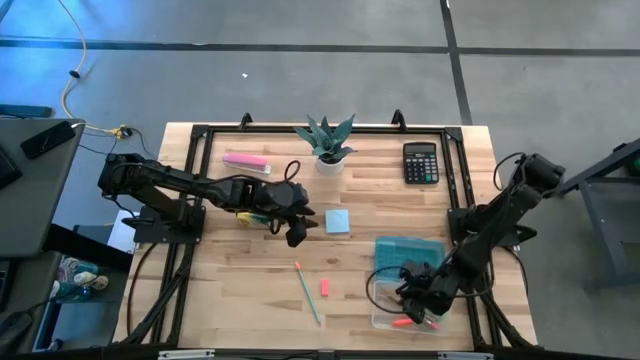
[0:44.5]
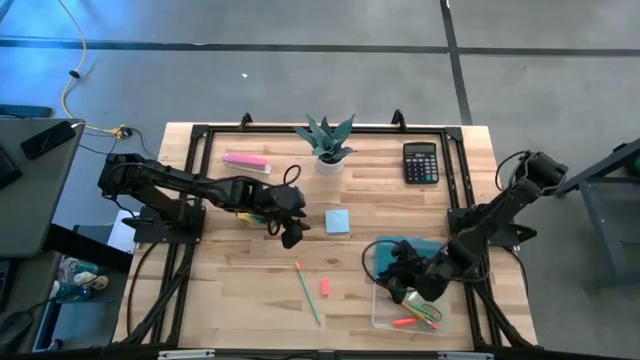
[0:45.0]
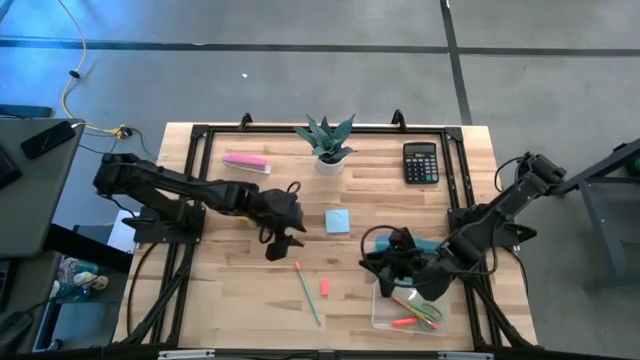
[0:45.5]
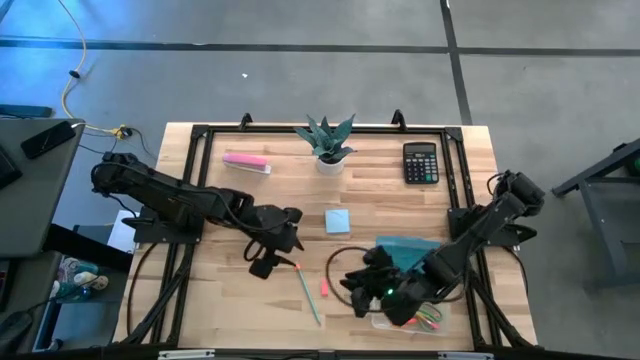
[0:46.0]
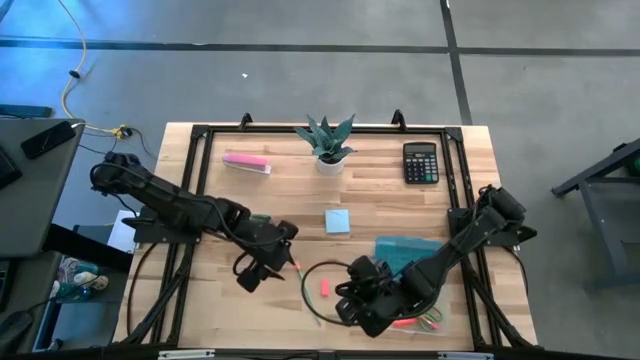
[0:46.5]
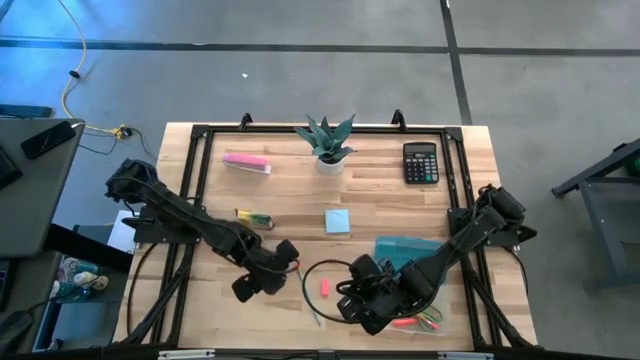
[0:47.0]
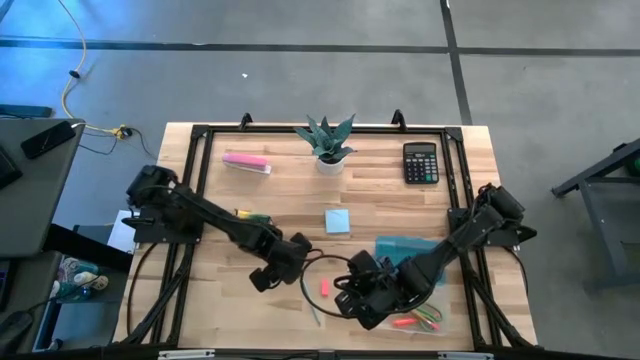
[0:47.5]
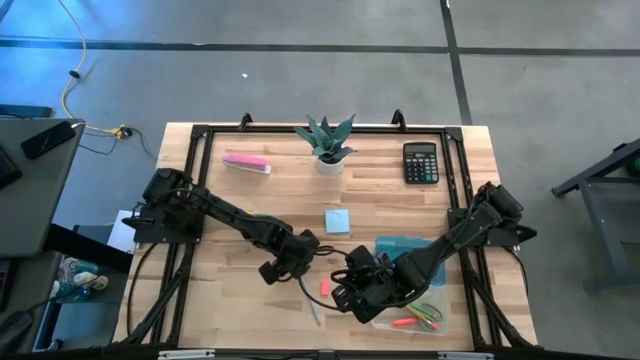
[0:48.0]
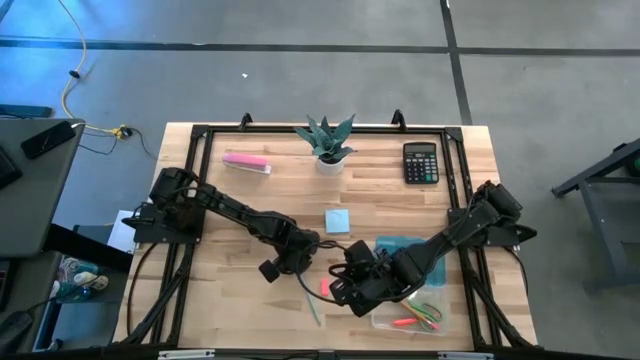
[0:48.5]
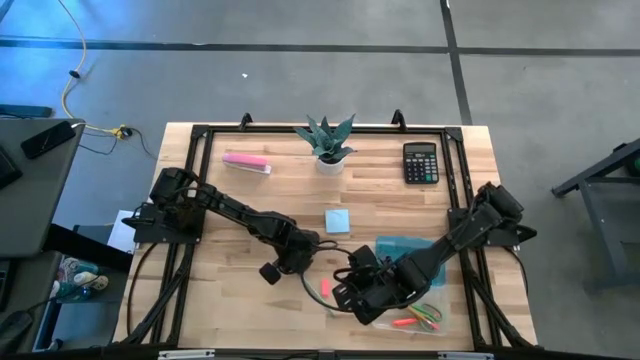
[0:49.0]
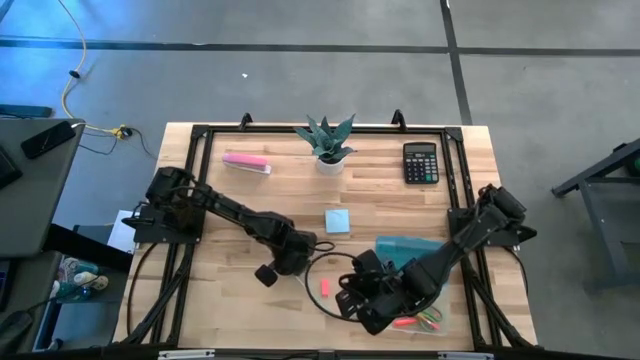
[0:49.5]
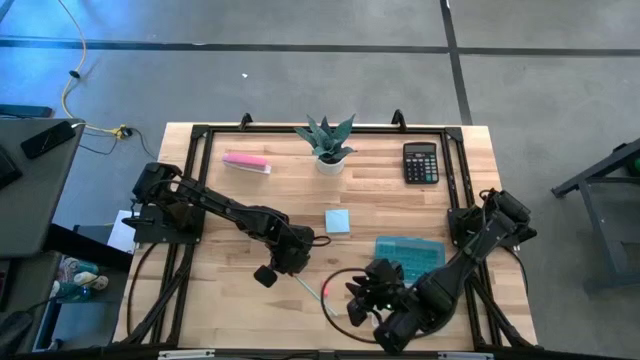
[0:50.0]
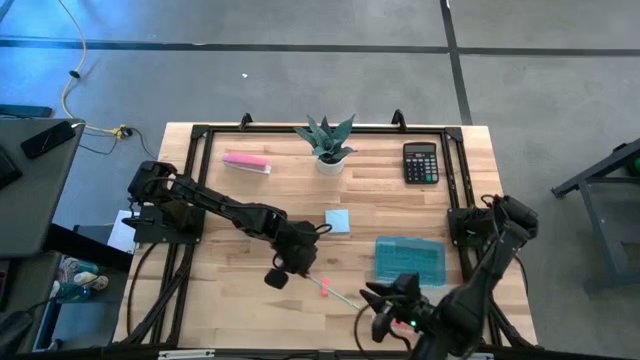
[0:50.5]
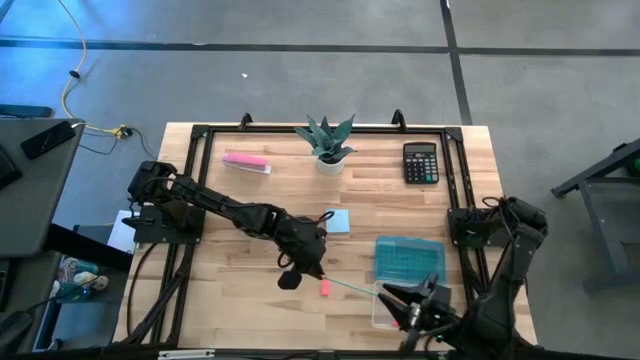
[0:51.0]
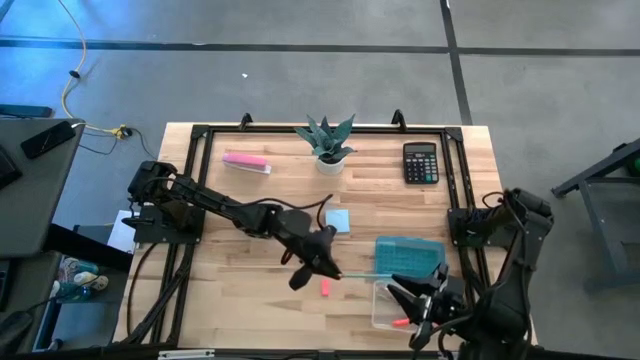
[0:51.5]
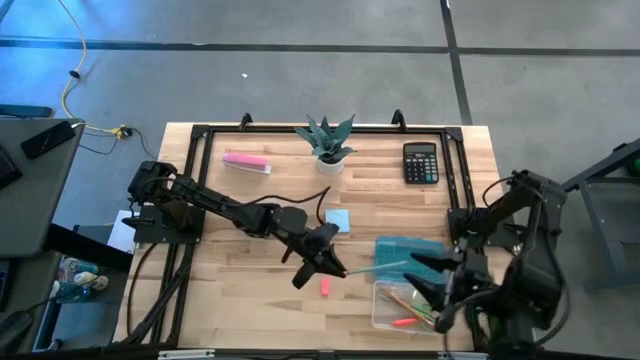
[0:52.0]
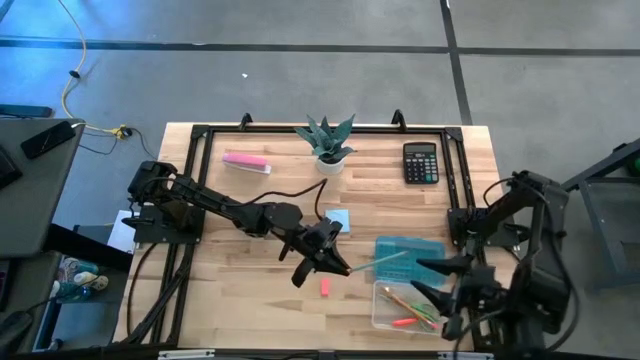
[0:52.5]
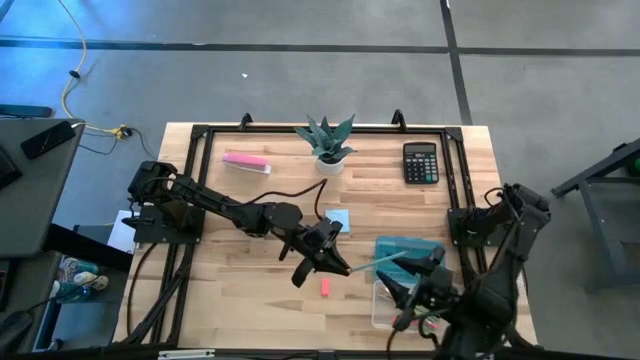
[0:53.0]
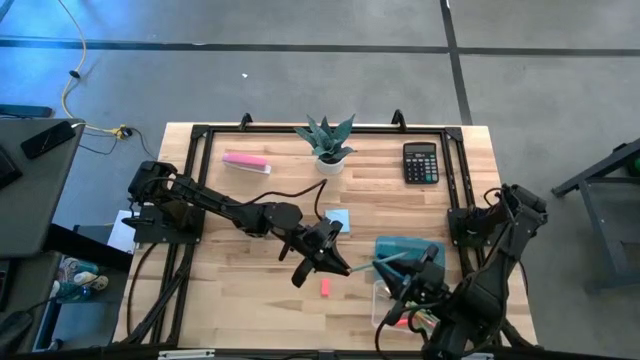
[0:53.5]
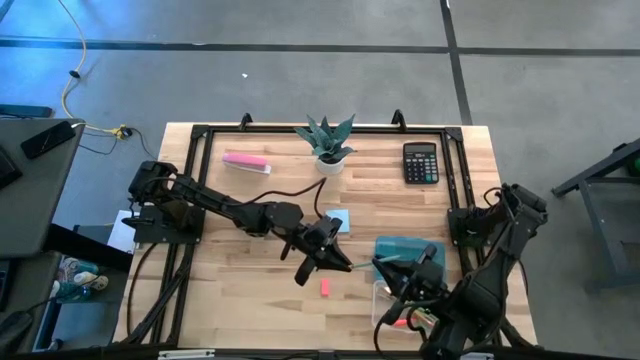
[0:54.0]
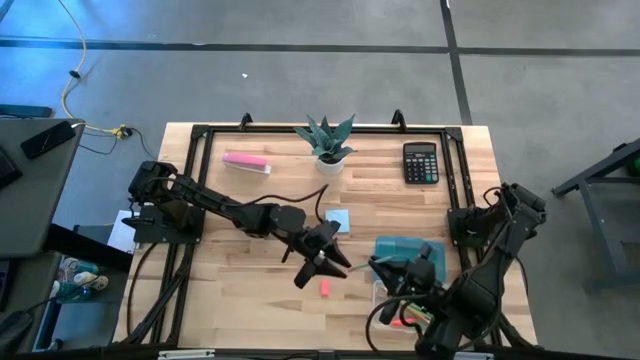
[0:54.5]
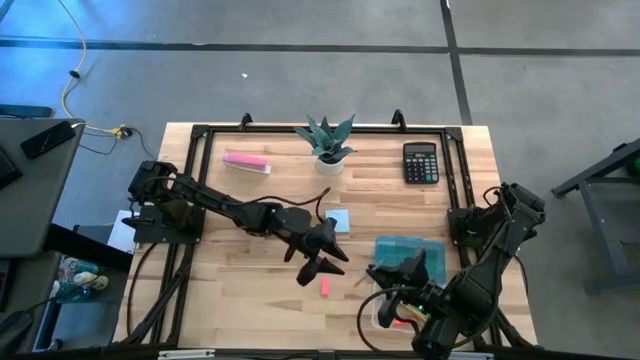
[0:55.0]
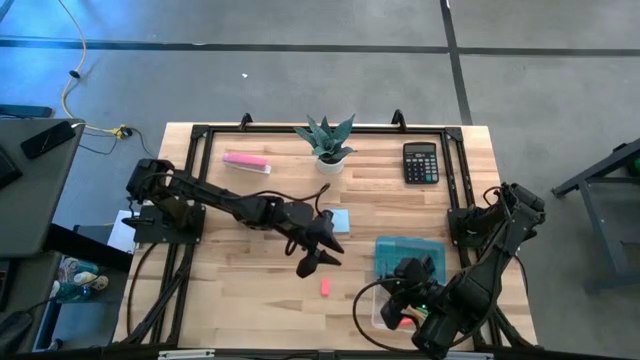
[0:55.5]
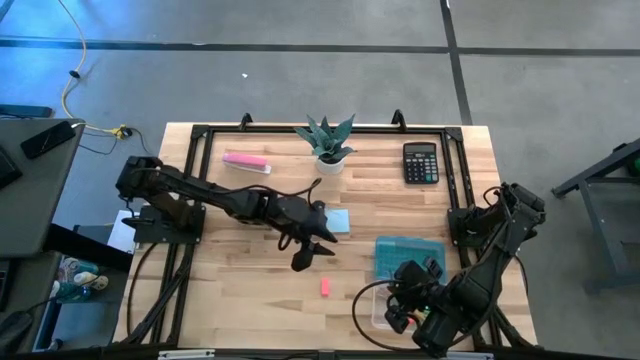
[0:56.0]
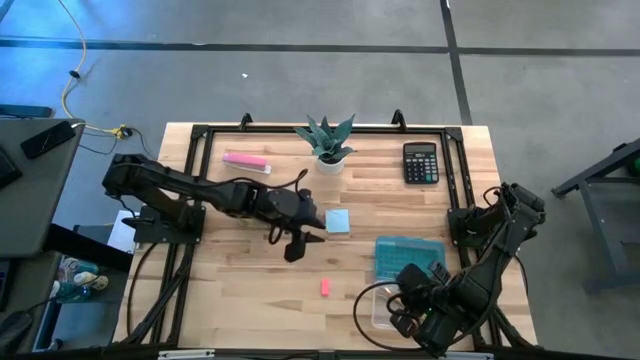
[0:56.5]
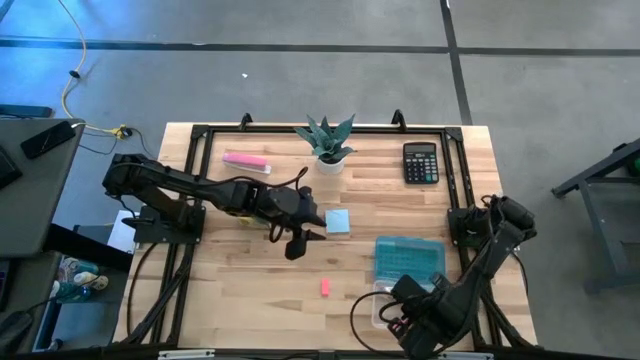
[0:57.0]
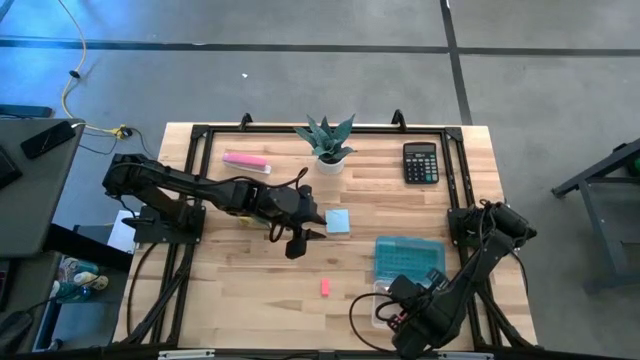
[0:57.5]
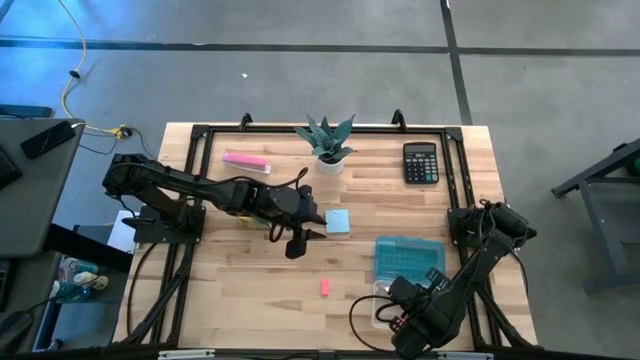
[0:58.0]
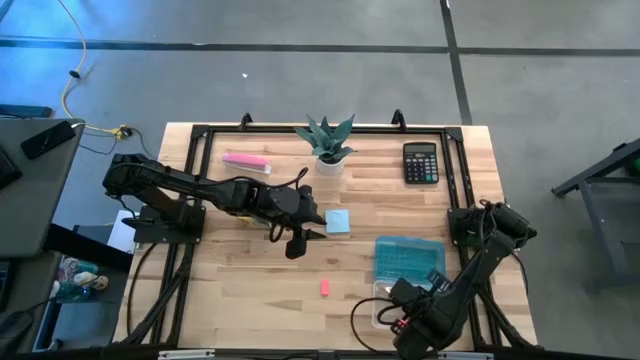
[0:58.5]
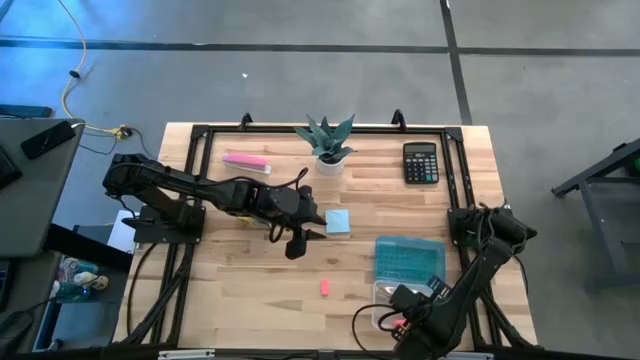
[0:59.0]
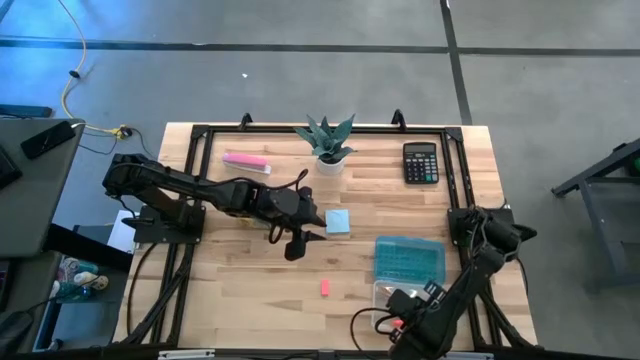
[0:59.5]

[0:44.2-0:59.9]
Task: Pack school essentials
Put the blue pencil into the blue supply box

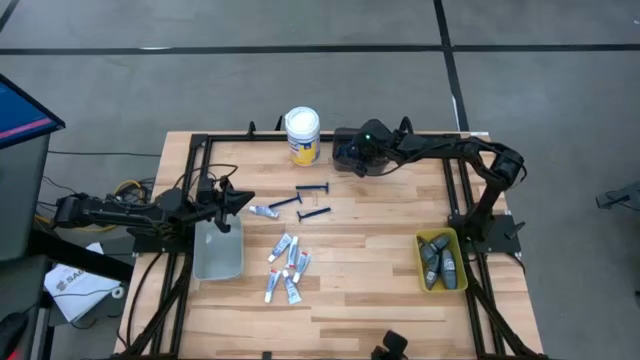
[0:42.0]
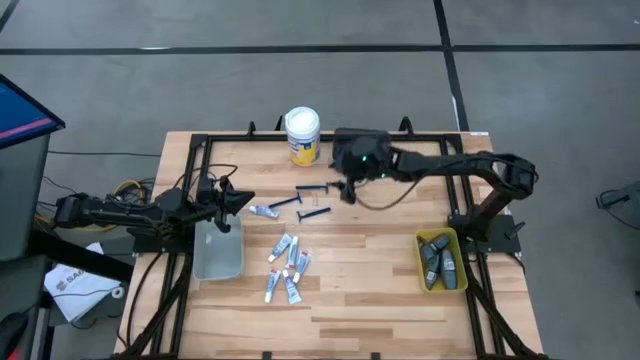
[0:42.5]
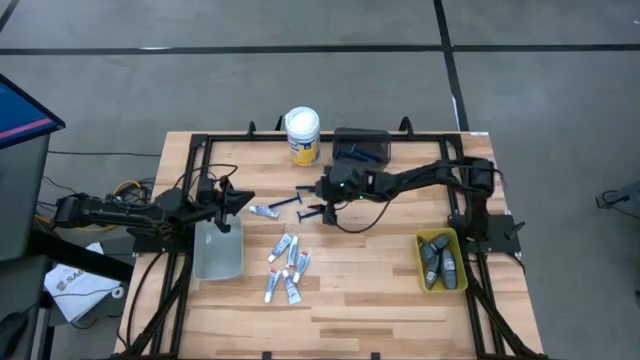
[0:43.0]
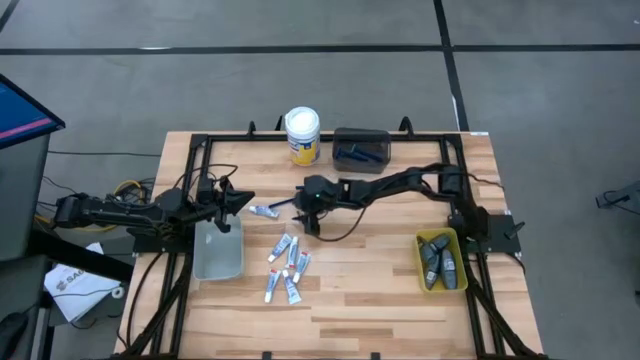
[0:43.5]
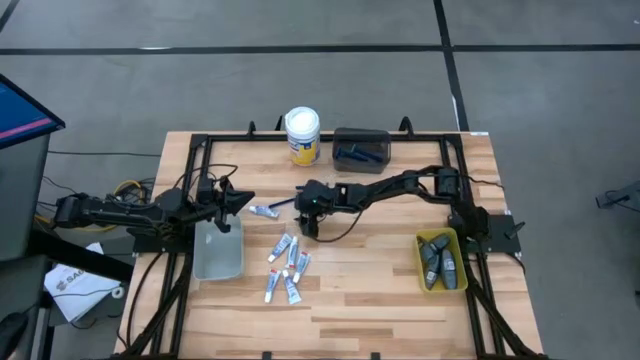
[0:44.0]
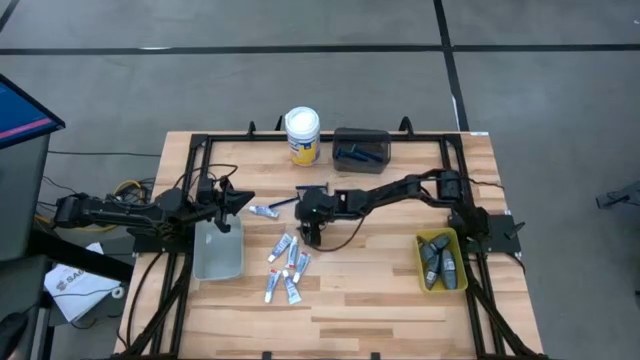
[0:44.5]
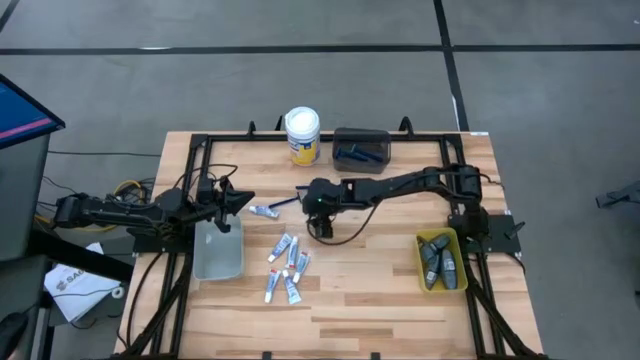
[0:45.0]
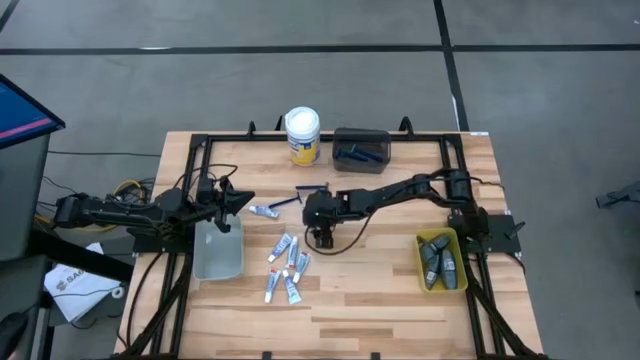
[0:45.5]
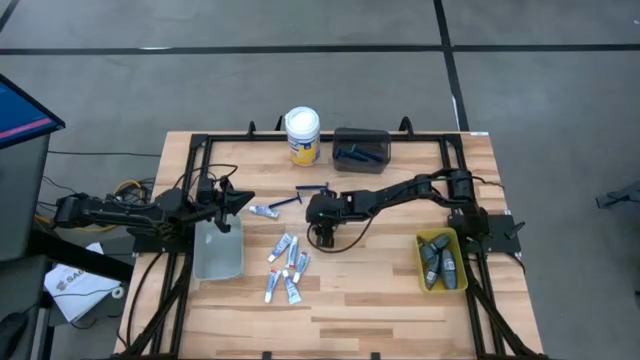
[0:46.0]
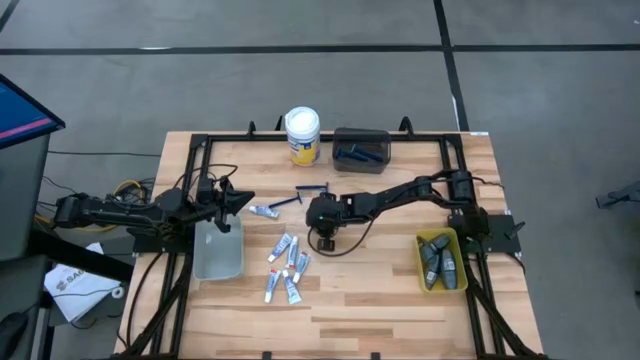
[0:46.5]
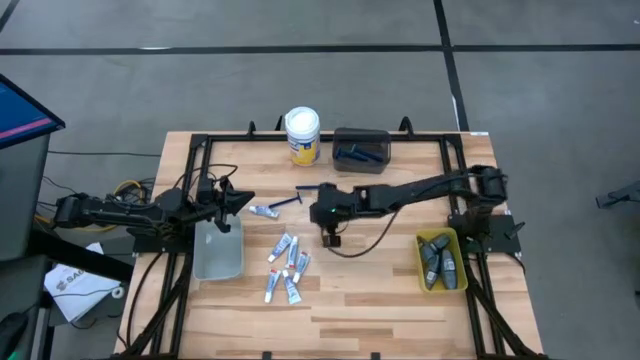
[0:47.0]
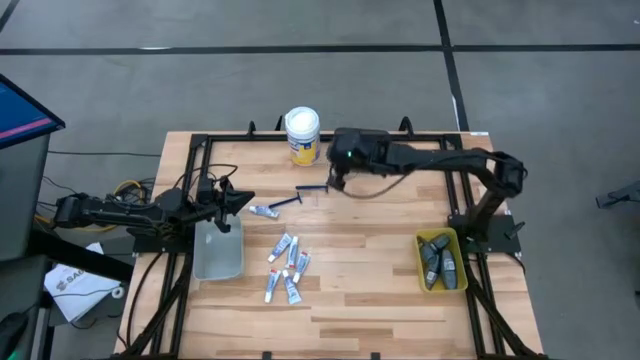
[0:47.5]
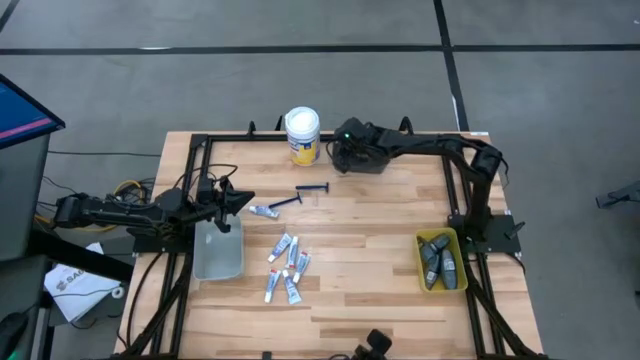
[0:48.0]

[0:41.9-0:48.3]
Task: Pick & Place Travel size toiletries
Put the blue razor into the black bin
